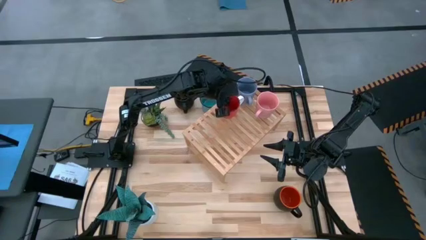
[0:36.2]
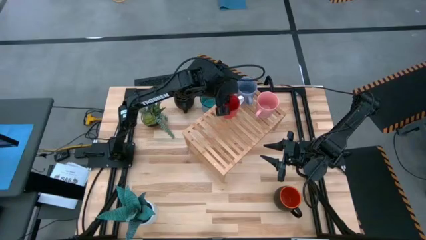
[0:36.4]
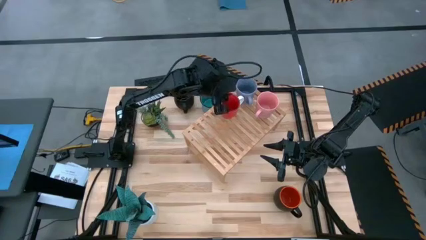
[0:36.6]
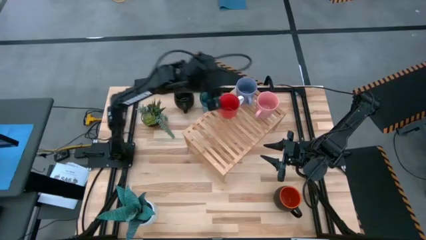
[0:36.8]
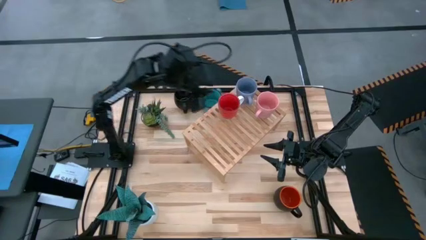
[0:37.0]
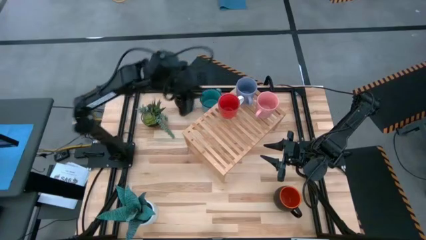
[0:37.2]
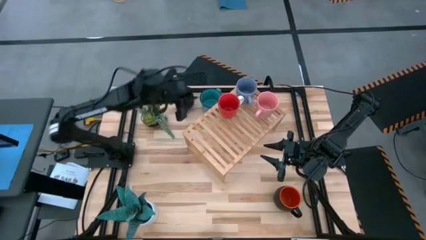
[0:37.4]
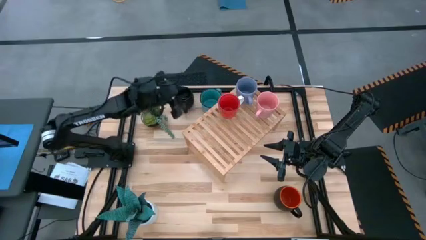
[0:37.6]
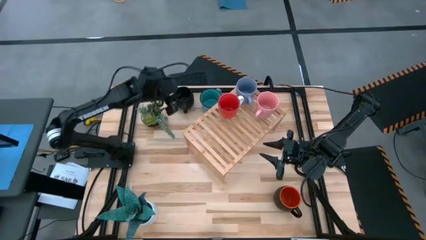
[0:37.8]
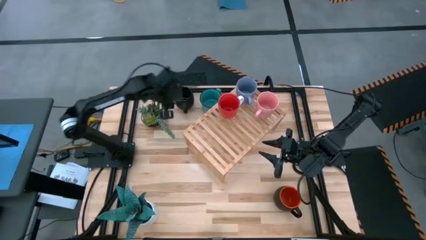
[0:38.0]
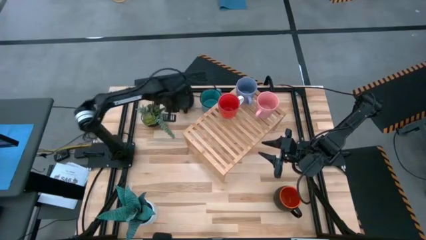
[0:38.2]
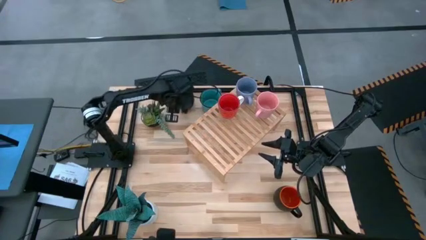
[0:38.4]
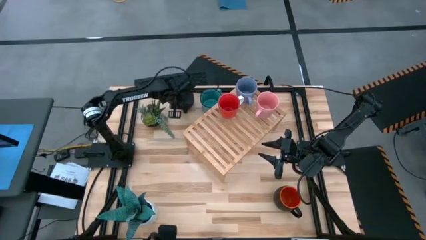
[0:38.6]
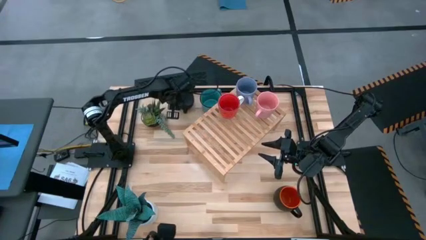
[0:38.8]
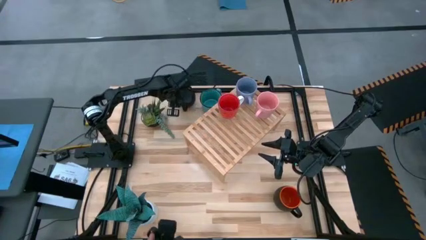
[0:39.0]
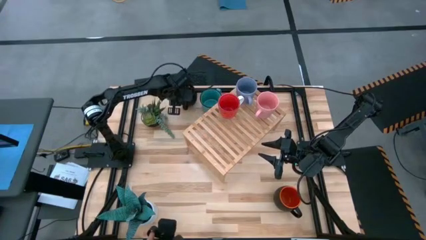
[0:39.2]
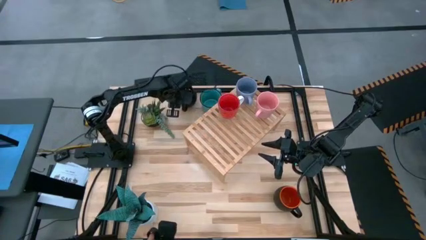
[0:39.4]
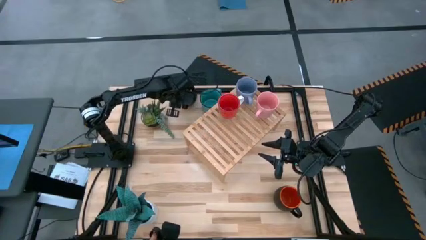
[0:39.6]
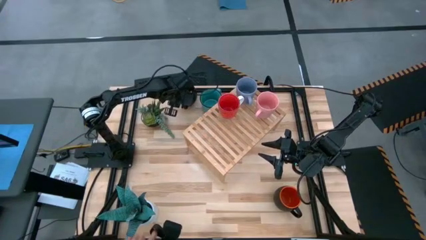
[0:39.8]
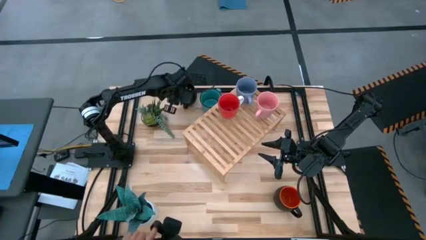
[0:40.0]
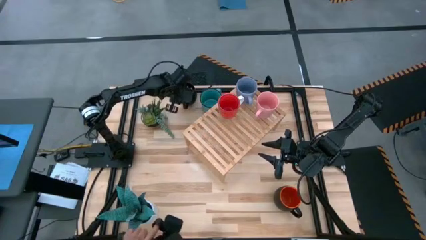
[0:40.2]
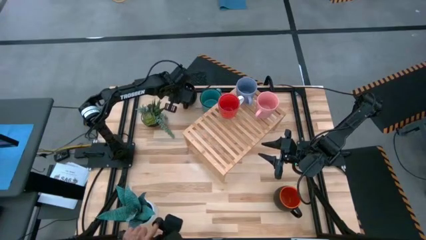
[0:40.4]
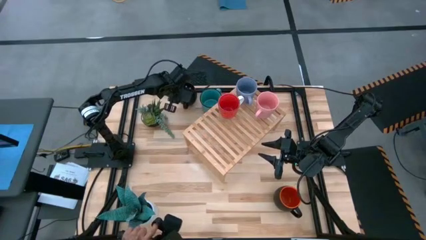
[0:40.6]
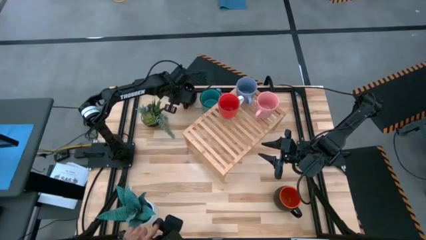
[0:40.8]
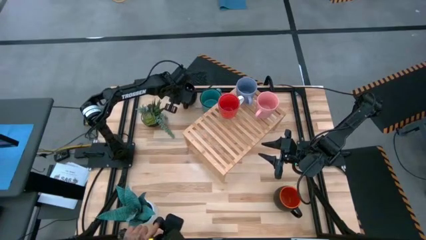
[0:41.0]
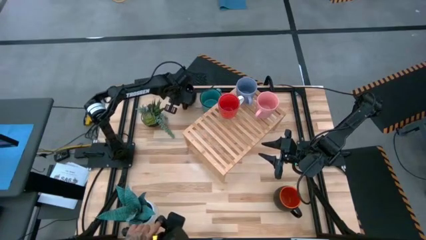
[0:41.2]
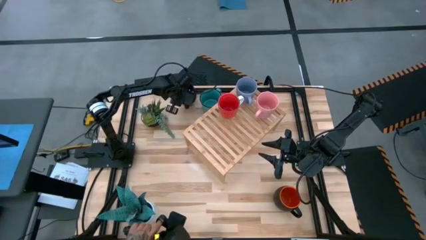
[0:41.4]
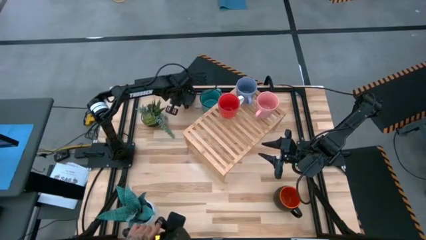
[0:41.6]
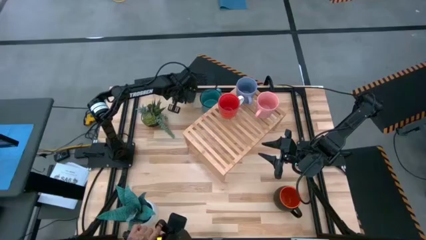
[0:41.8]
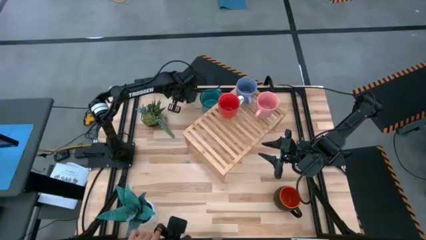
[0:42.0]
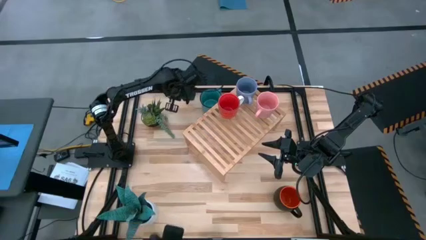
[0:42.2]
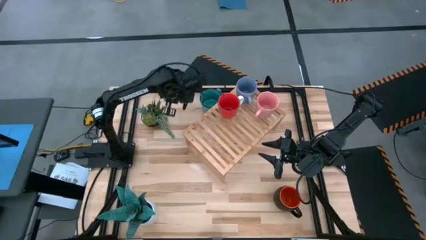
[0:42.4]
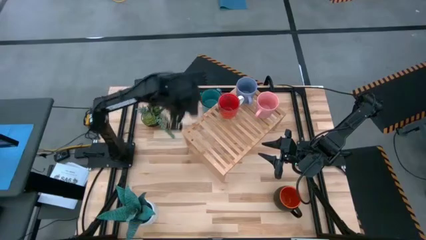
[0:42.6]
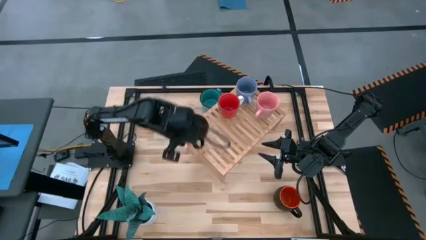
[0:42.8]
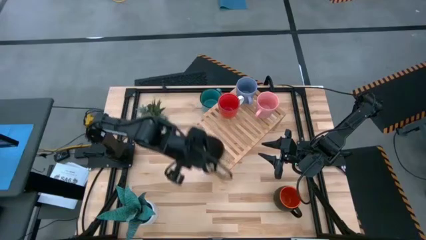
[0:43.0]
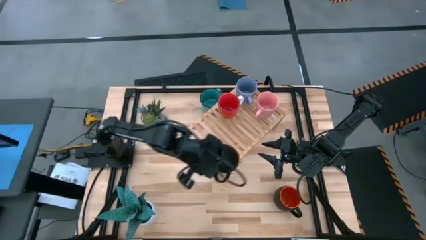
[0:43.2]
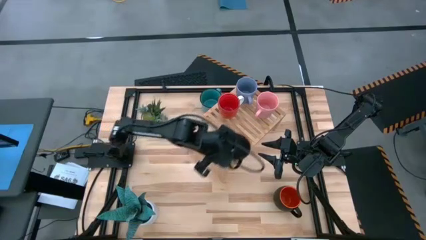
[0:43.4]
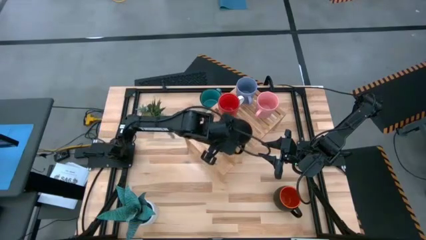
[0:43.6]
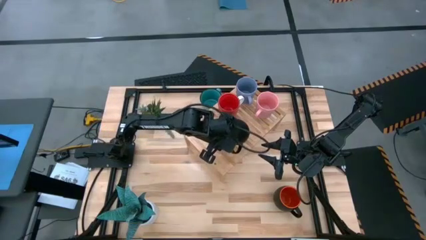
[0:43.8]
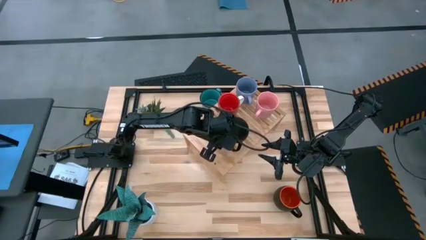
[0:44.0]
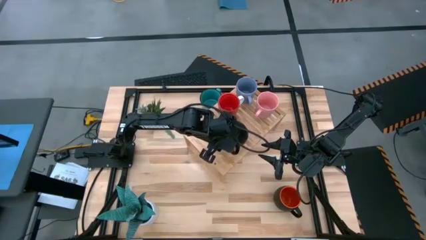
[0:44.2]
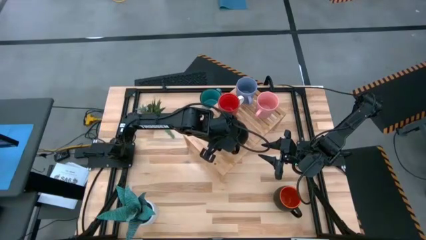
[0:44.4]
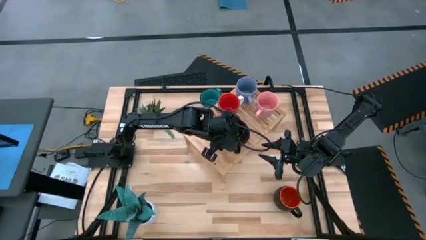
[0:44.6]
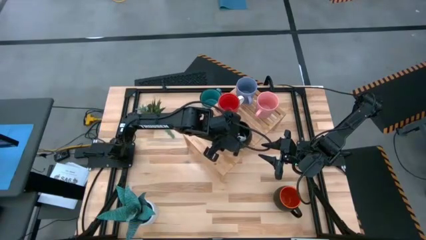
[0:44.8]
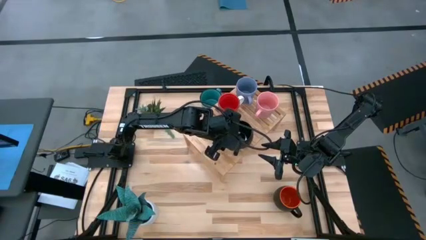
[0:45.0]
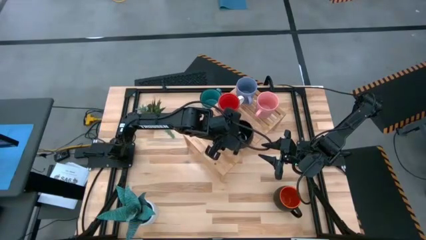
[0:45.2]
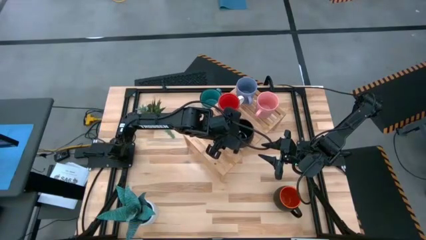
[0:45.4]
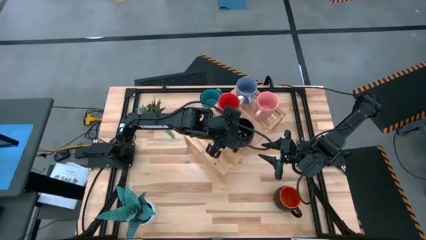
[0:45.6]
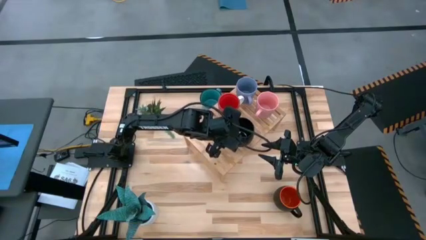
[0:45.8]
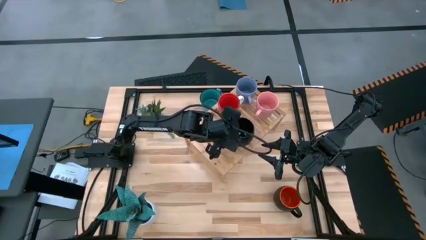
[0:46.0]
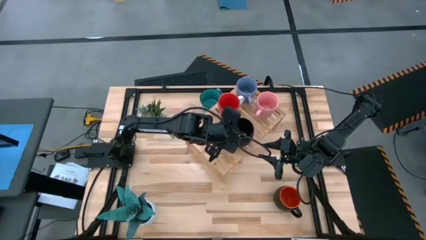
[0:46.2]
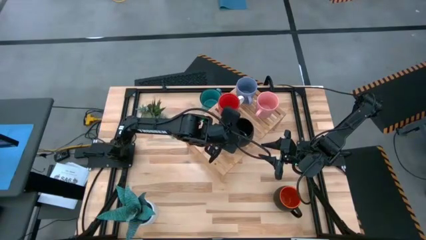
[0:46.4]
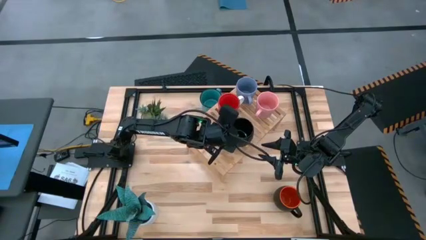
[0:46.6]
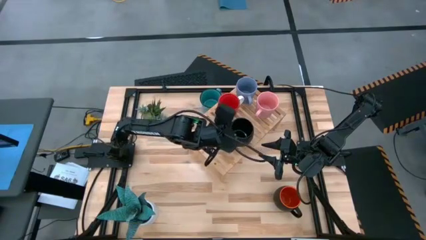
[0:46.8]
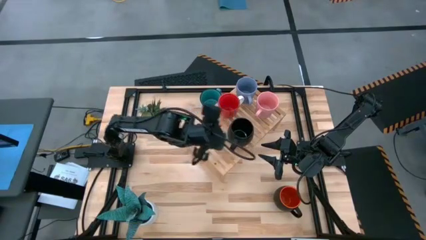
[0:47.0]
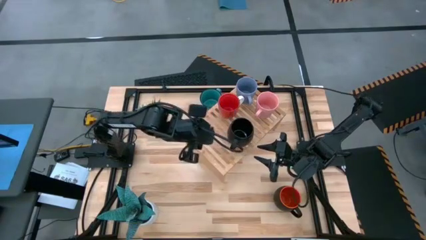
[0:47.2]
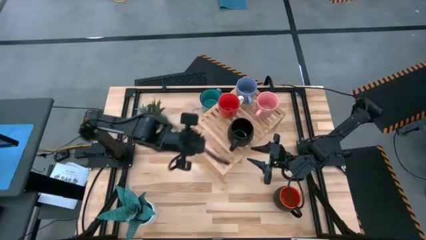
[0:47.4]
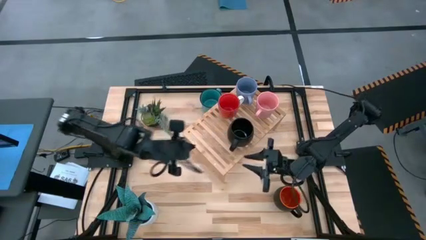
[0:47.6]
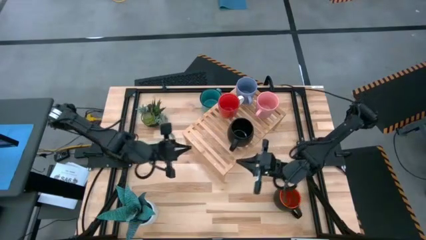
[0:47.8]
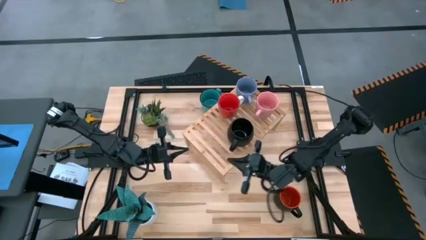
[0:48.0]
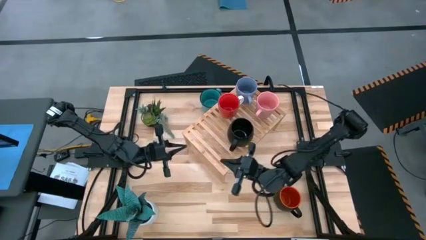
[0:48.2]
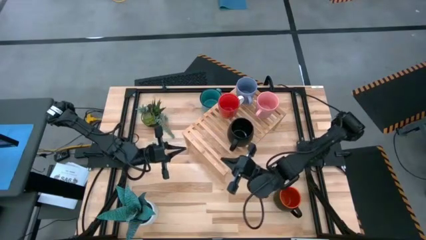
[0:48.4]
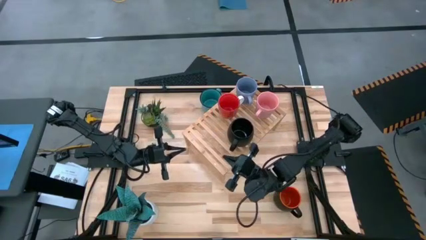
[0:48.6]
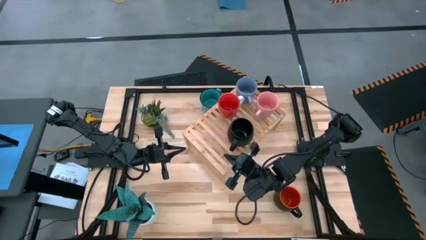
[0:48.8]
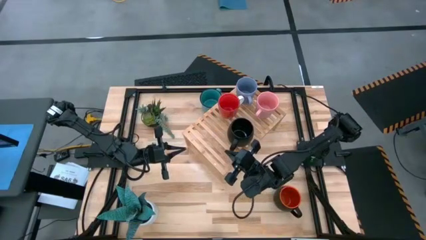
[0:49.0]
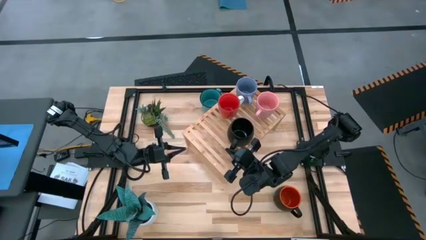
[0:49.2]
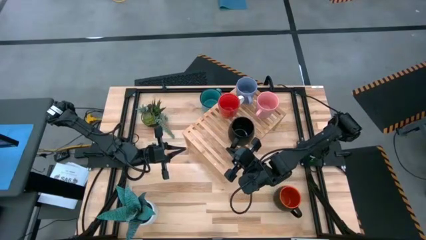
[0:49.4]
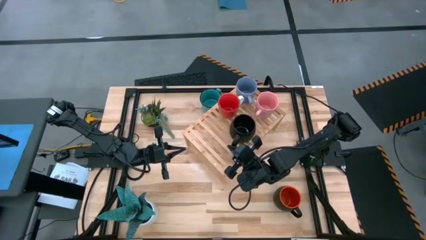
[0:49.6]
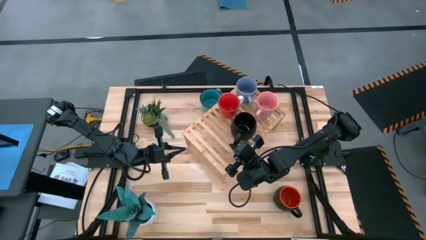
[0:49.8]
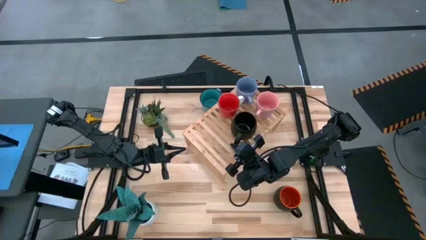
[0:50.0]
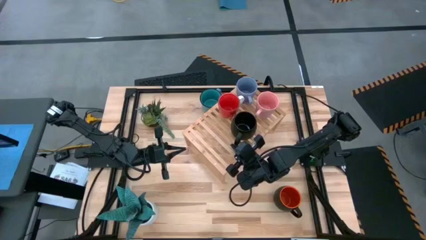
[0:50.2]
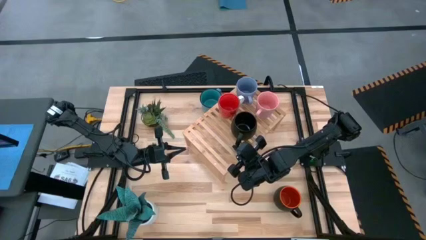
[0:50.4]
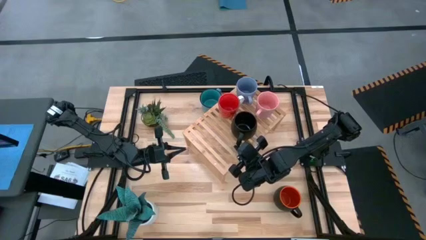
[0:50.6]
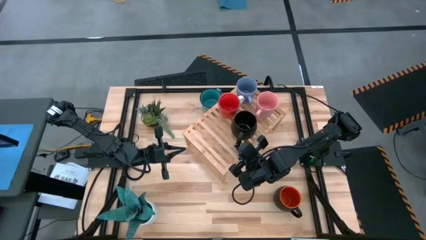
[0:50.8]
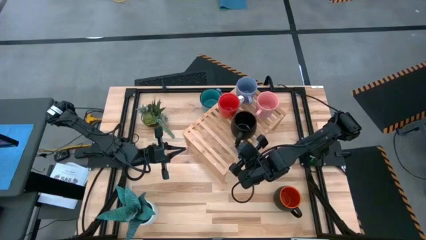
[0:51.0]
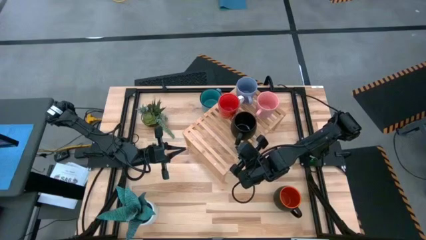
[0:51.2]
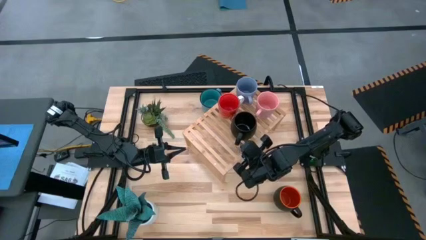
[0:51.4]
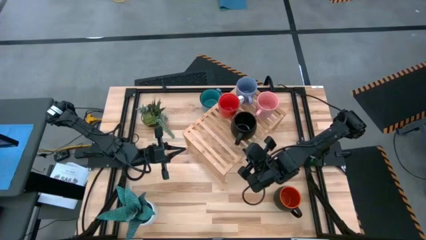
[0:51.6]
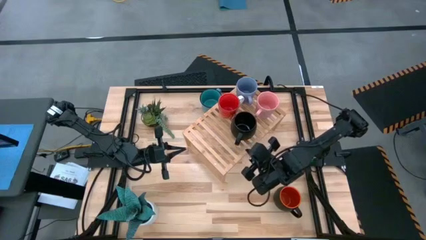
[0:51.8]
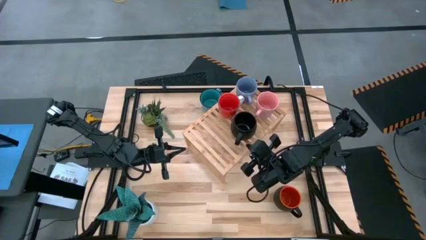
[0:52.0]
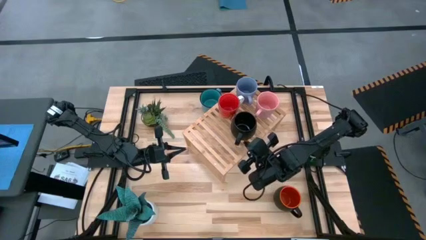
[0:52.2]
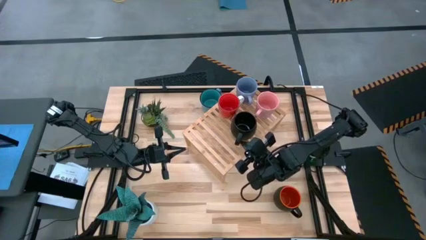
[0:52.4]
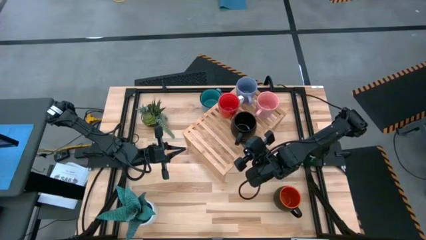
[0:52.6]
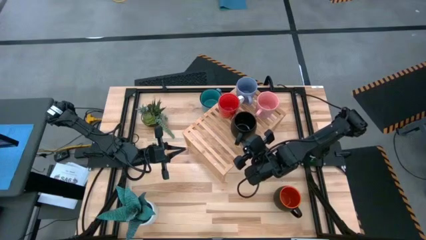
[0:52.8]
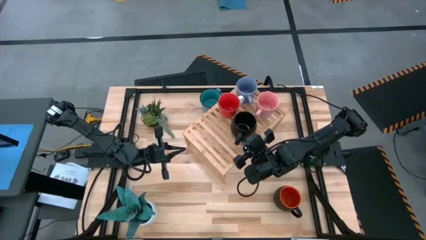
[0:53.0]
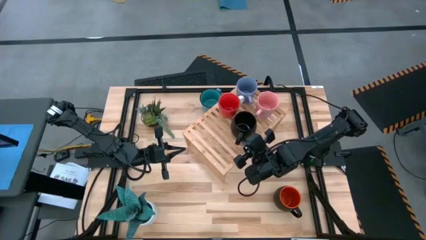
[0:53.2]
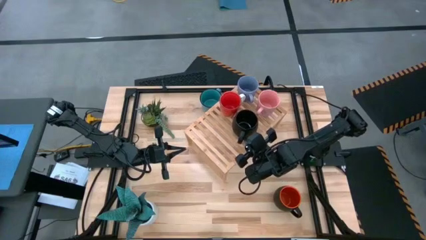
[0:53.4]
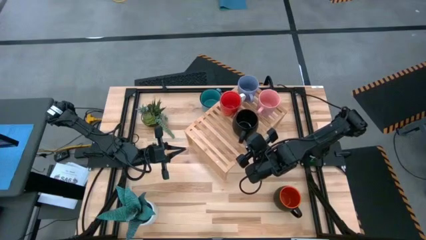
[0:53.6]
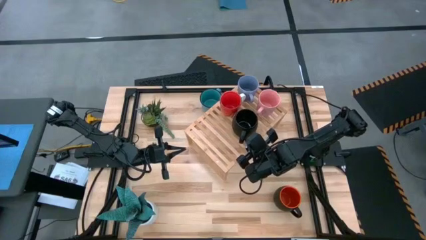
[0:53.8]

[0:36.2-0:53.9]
Task: Place coffee mugs
Put the black mug on the shelf
